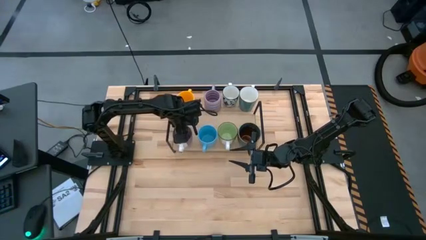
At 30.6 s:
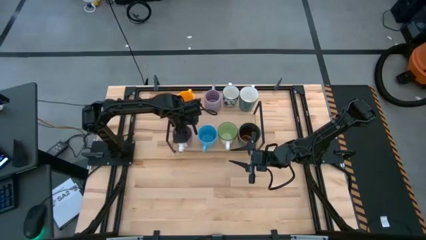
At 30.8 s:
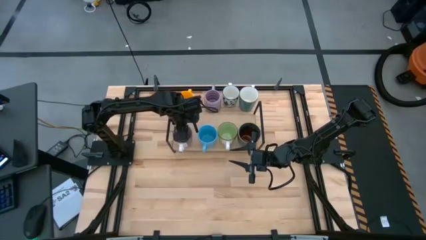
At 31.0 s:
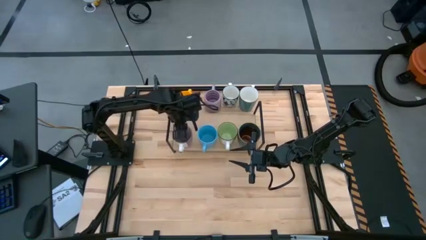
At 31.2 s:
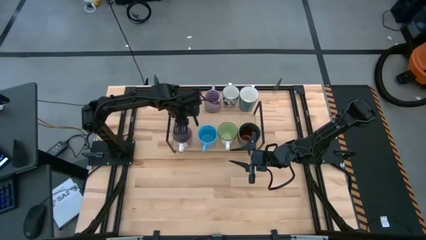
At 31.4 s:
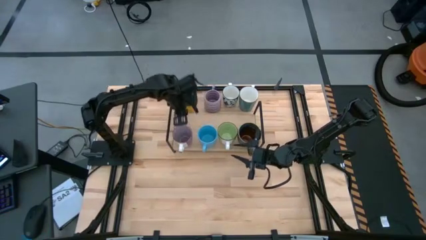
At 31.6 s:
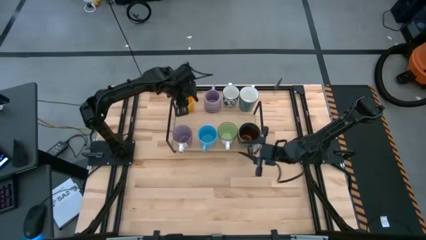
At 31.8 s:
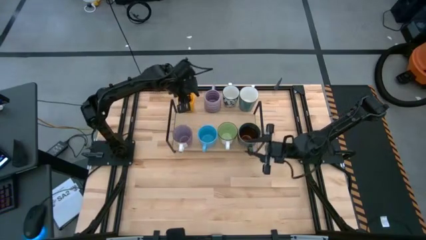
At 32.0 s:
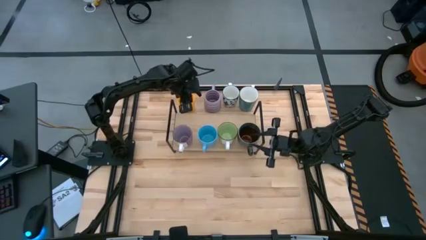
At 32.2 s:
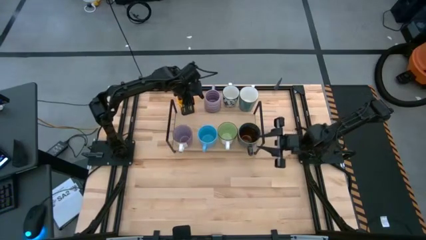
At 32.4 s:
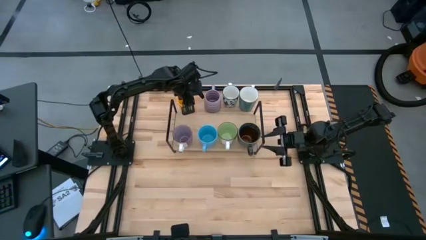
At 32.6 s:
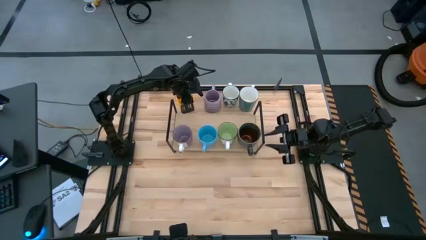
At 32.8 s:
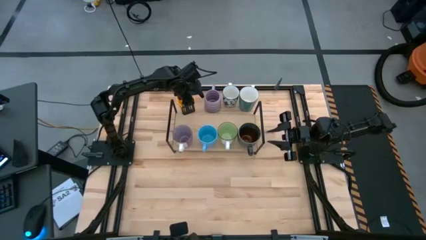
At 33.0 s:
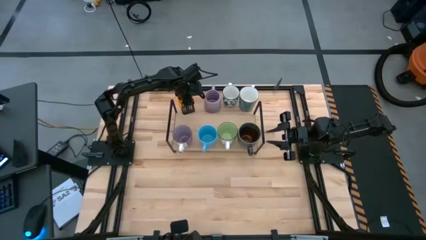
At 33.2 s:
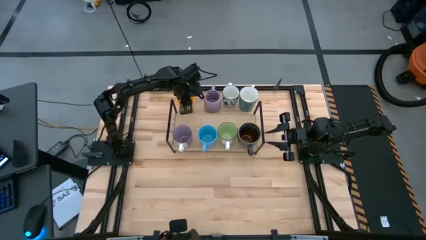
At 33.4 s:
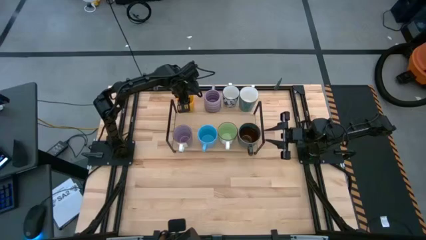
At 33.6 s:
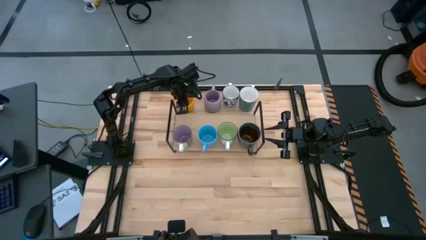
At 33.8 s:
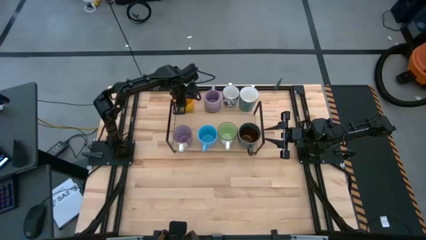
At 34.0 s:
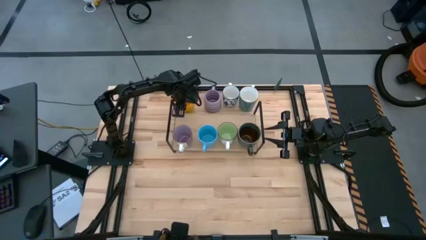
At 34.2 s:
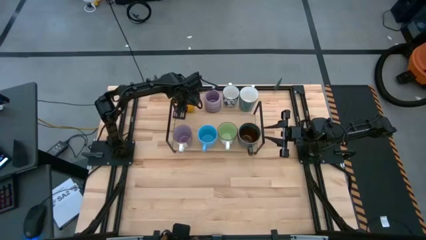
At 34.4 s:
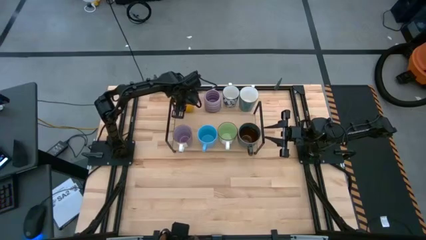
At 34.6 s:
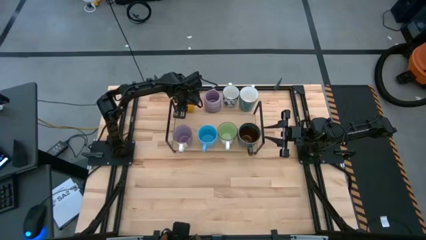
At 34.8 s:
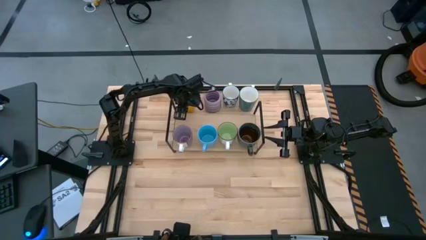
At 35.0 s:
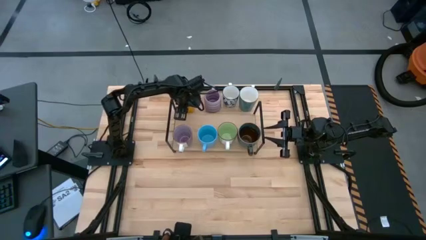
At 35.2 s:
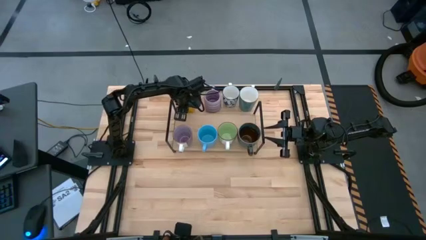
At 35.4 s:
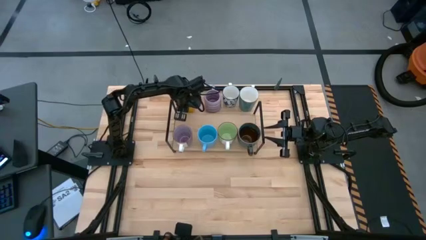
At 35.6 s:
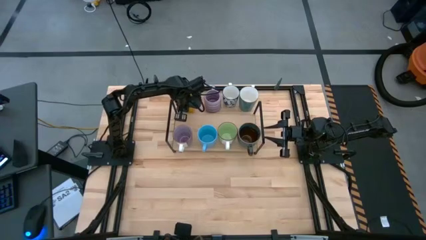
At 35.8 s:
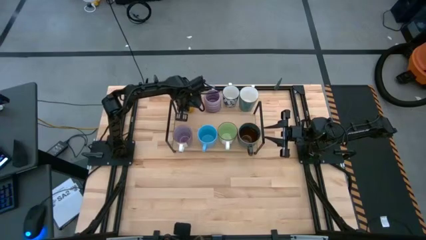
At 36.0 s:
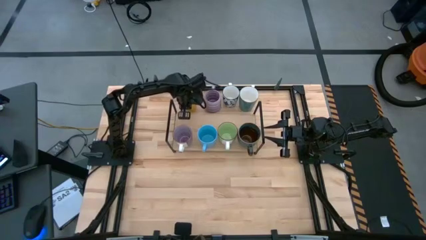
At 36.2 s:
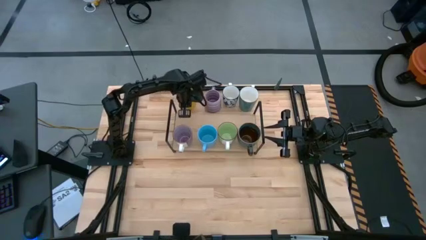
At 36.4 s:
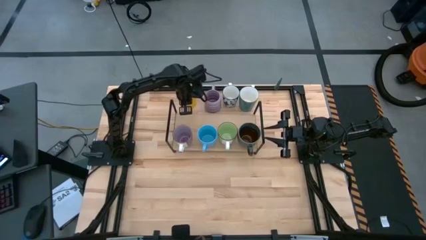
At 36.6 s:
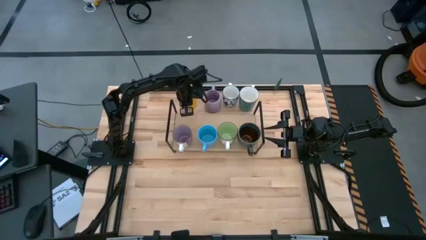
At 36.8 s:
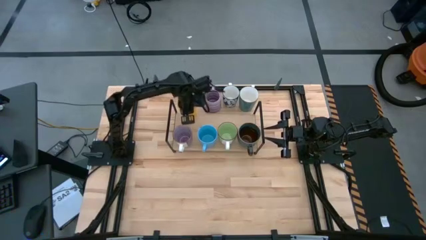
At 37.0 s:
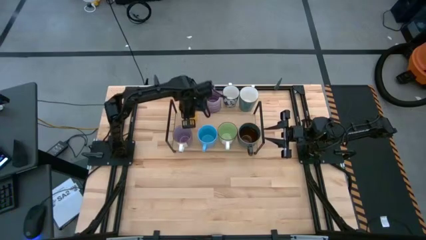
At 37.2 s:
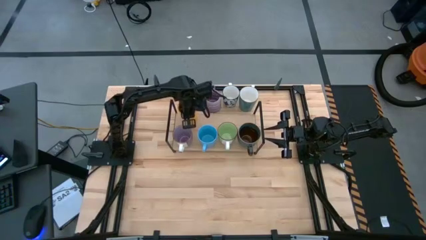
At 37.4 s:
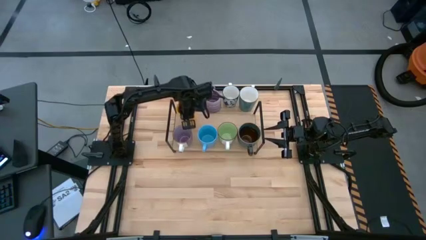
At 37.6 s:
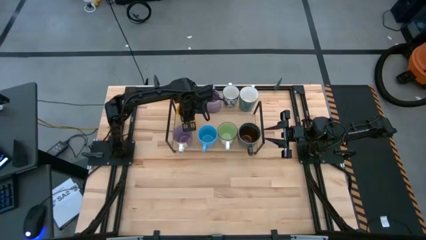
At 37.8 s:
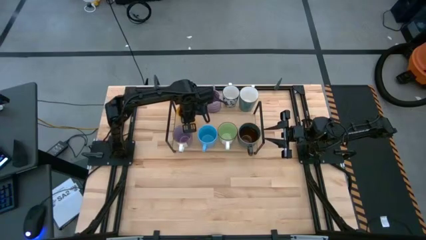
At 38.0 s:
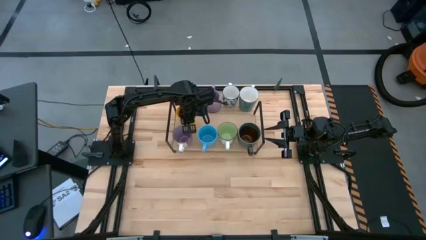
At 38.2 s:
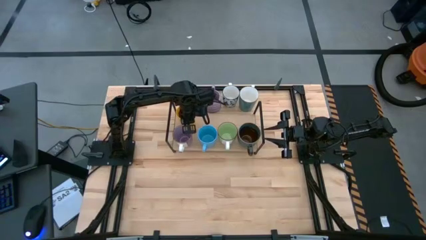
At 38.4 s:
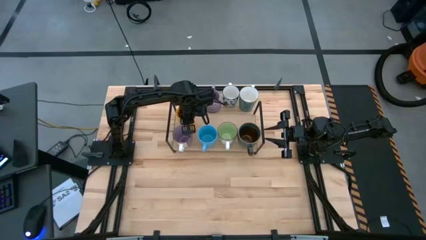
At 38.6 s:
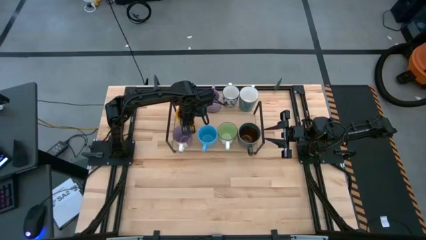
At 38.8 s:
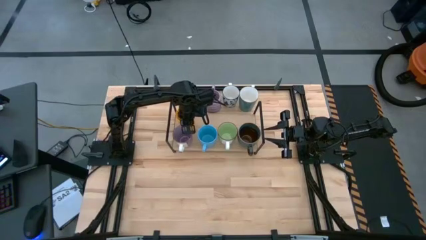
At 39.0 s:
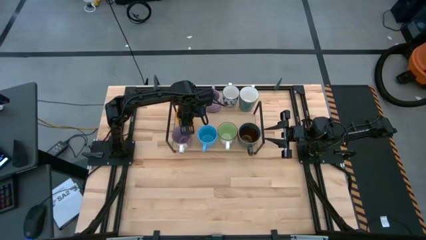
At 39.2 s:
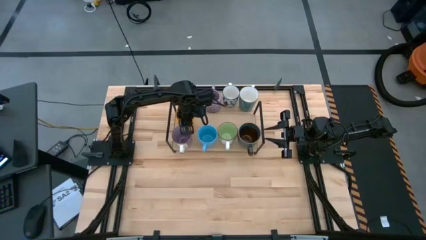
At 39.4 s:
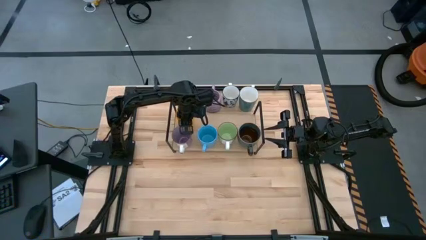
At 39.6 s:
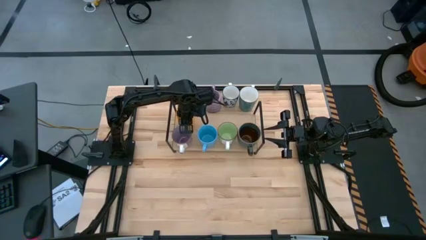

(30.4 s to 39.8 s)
Task: Place coffee mugs
Put the yellow mug on the shelf

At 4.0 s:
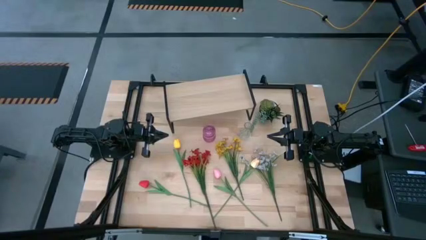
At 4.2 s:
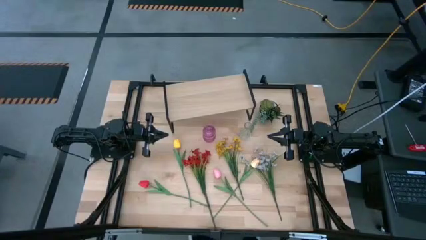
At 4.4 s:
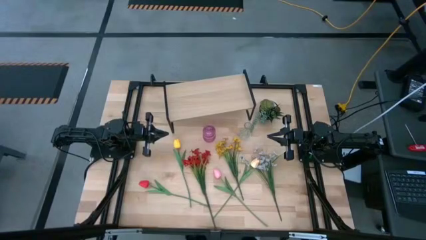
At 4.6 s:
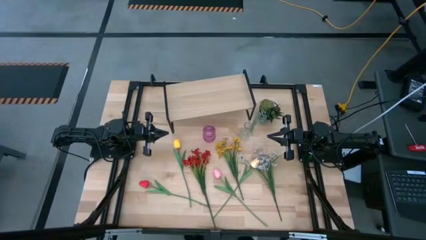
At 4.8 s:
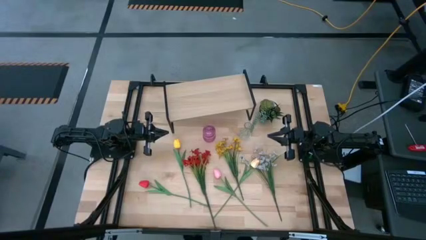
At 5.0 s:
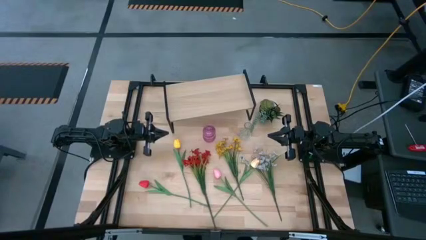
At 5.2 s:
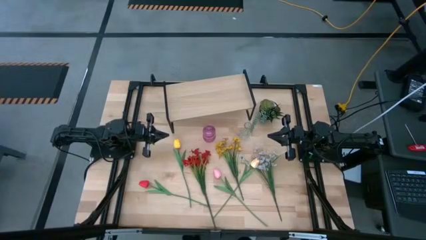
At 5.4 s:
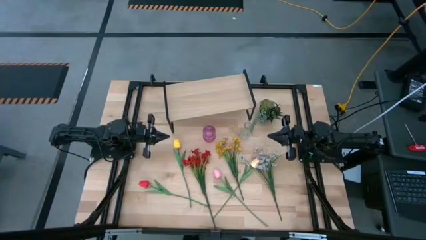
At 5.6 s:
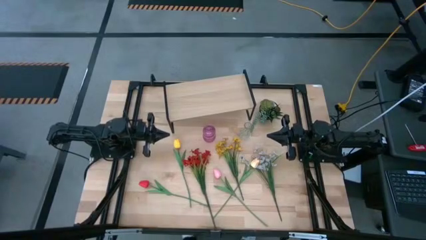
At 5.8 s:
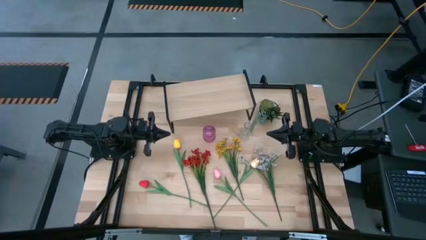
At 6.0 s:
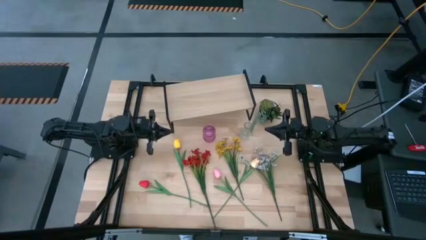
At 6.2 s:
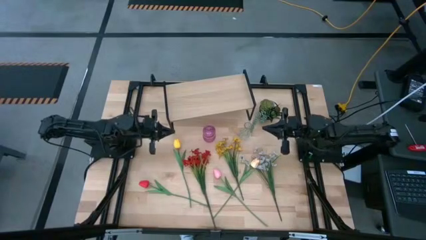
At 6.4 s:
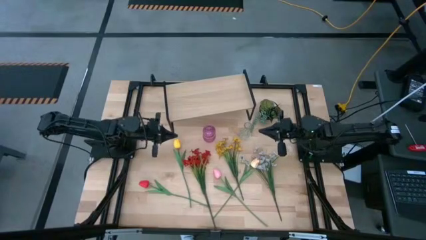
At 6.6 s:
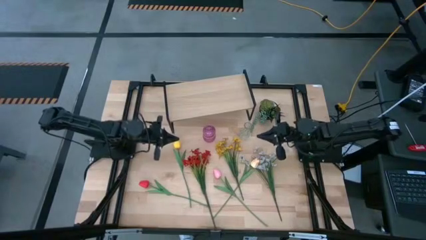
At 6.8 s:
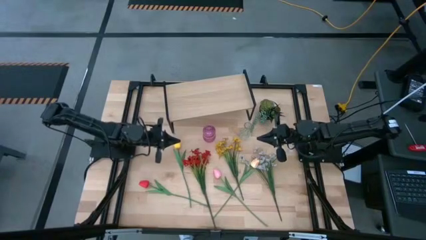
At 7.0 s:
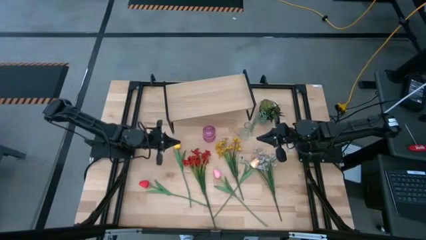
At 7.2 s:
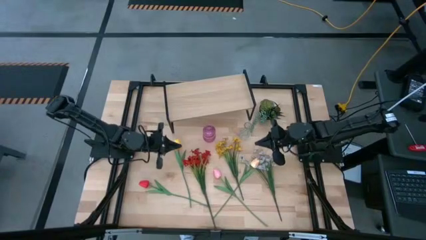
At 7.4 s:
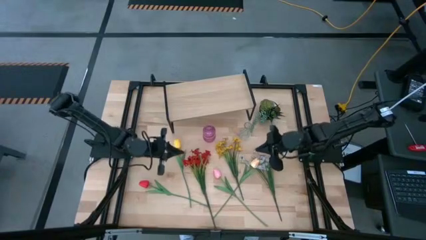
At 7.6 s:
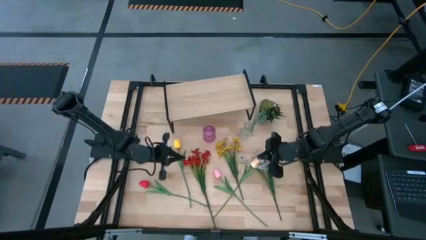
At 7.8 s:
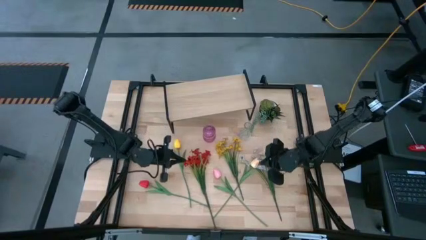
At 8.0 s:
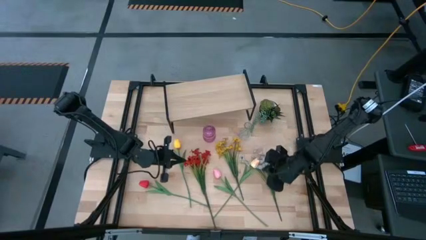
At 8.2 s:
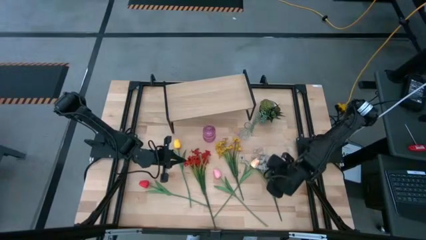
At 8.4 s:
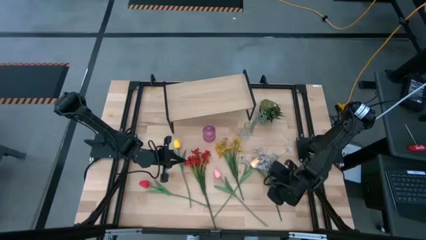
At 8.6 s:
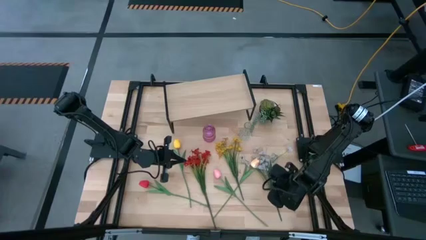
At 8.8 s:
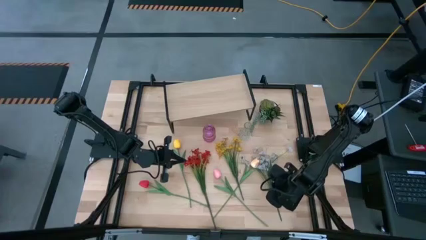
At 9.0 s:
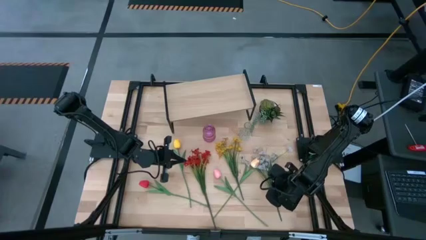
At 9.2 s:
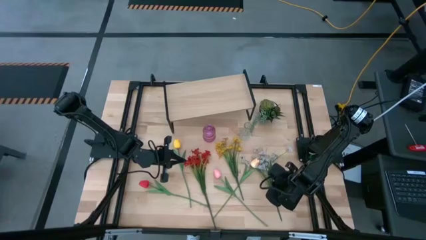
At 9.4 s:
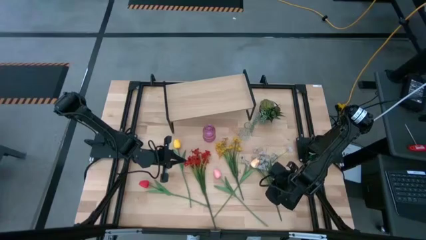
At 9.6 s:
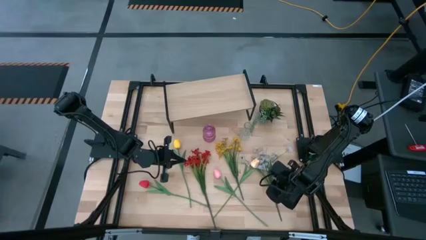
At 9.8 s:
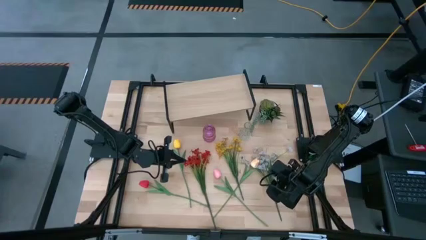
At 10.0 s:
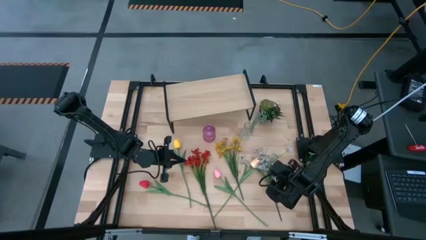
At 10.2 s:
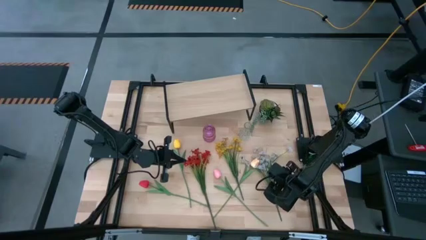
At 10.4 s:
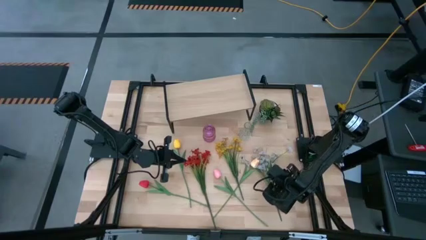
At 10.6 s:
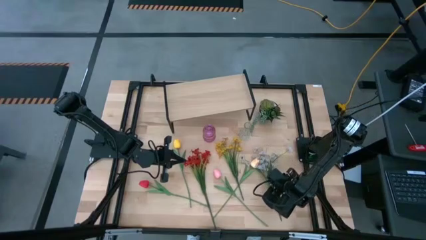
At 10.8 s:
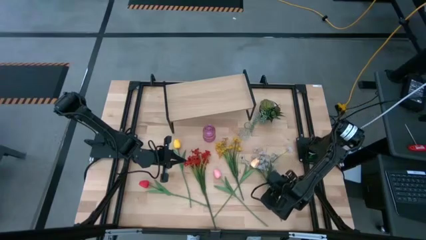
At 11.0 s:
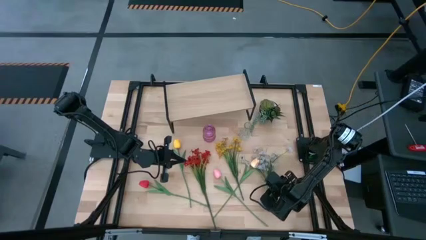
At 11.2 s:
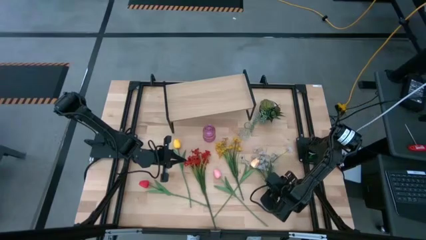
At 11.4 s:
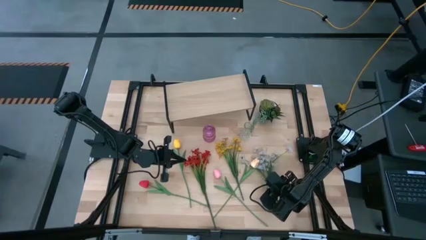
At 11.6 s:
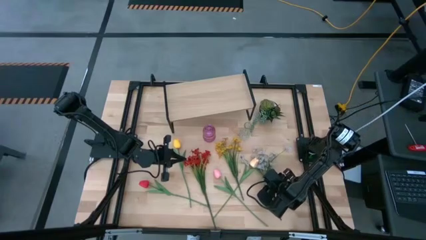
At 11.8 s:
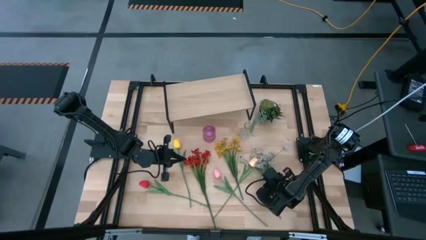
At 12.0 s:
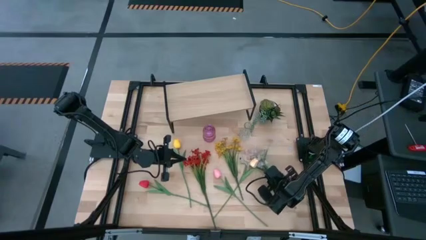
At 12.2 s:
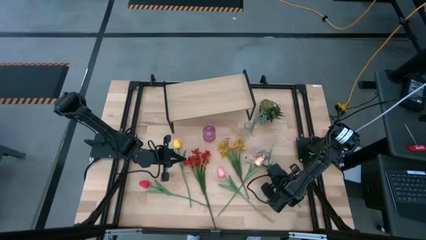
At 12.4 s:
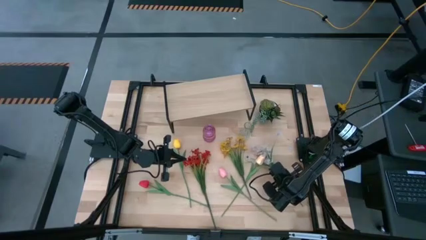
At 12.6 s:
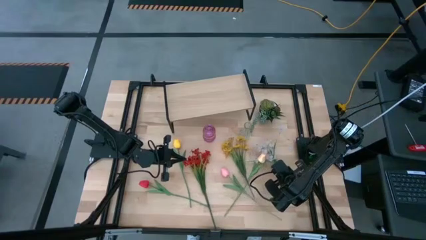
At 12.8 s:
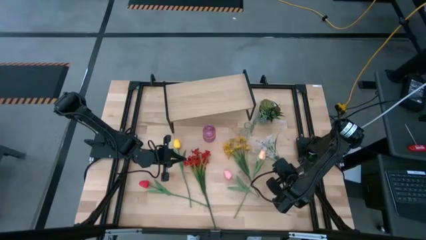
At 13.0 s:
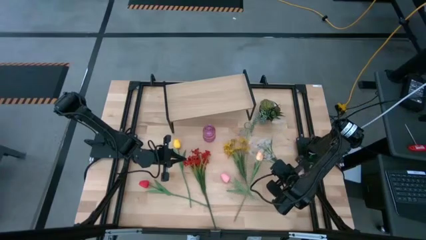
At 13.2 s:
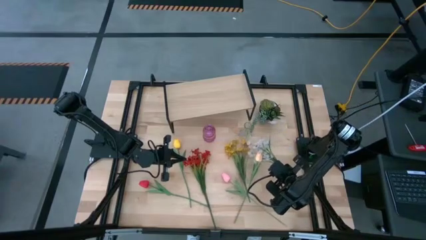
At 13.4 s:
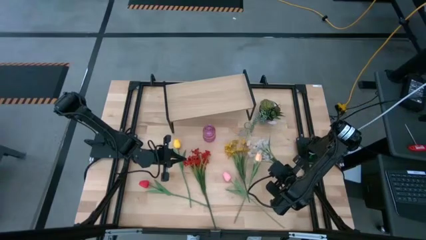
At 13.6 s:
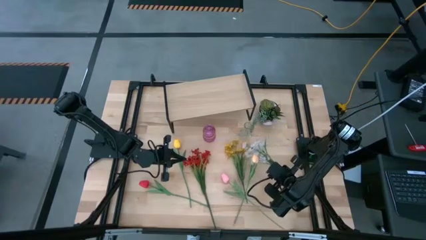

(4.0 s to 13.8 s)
Task: Pick and place flowers into a vace then onto a shelf
Put the white flowers into the transparent vase
